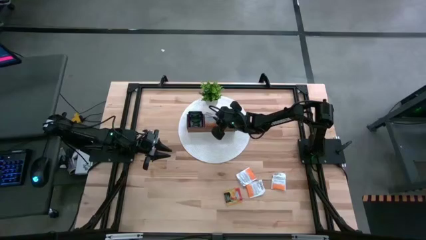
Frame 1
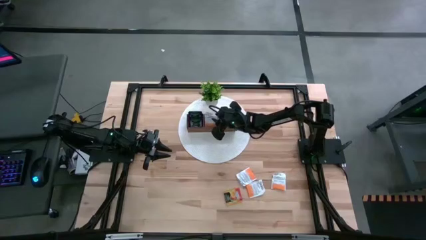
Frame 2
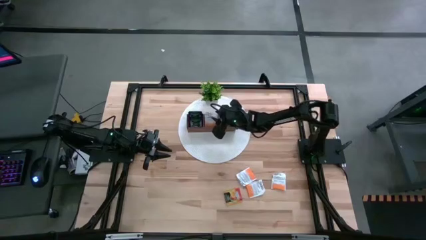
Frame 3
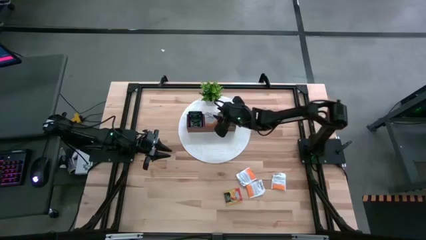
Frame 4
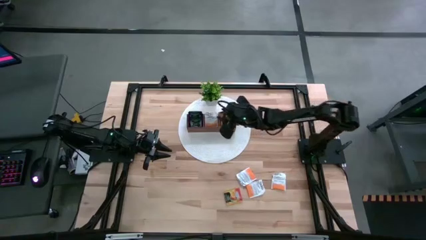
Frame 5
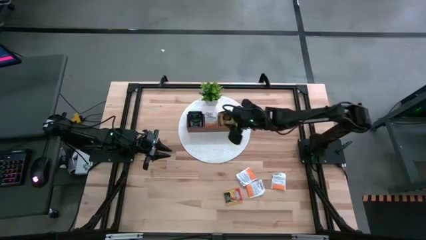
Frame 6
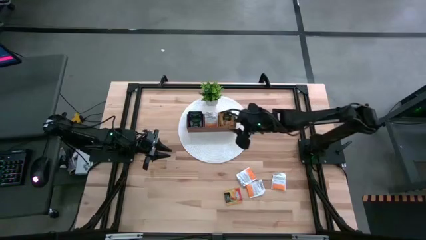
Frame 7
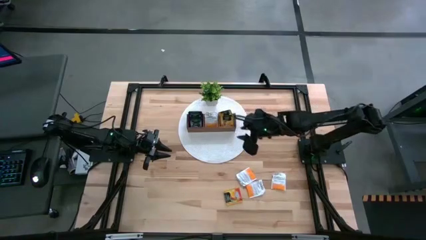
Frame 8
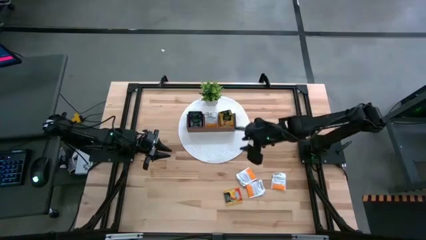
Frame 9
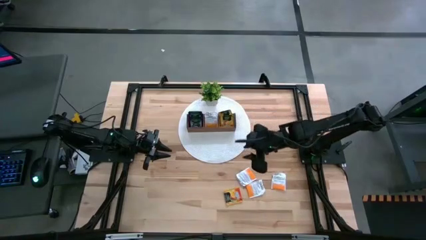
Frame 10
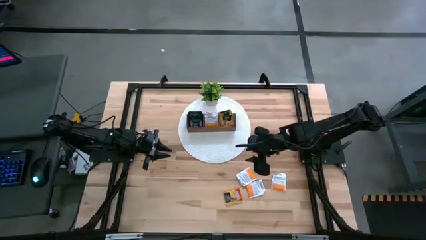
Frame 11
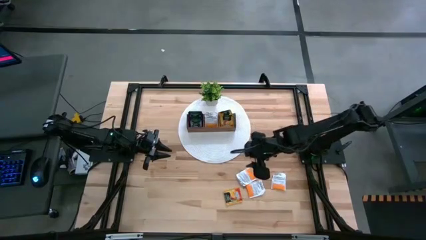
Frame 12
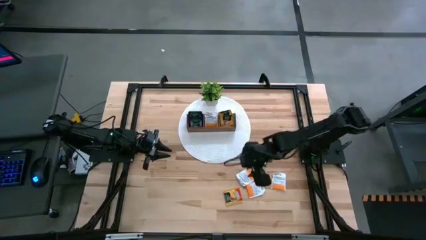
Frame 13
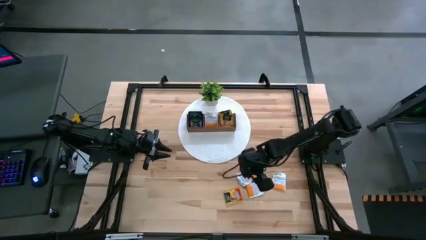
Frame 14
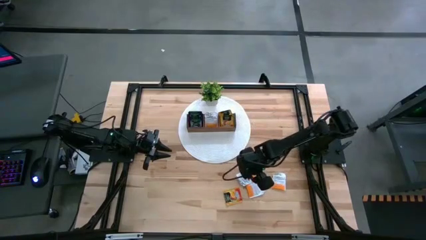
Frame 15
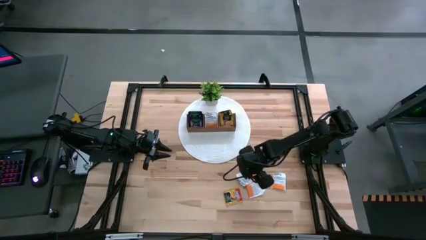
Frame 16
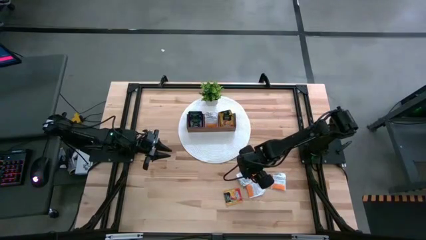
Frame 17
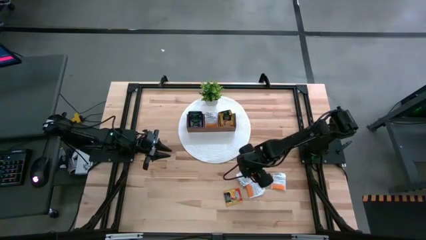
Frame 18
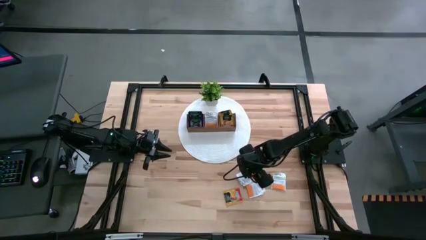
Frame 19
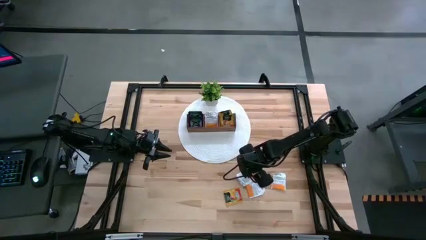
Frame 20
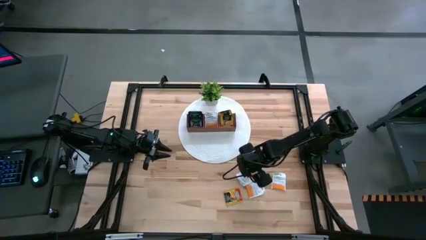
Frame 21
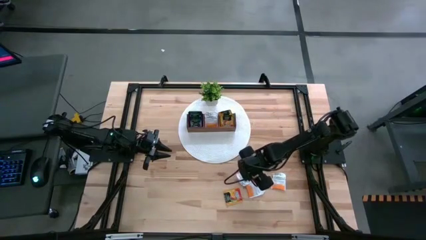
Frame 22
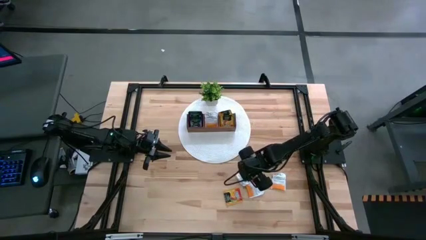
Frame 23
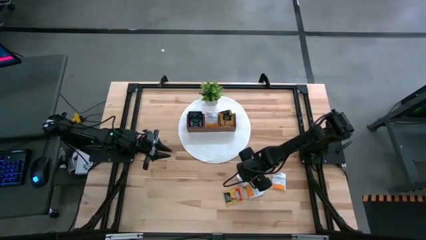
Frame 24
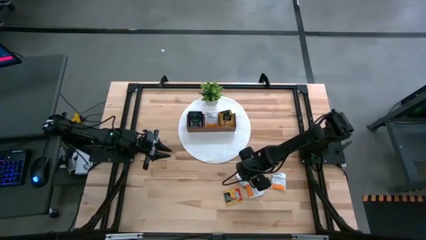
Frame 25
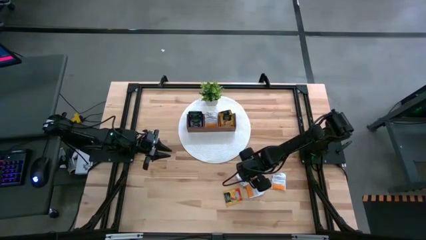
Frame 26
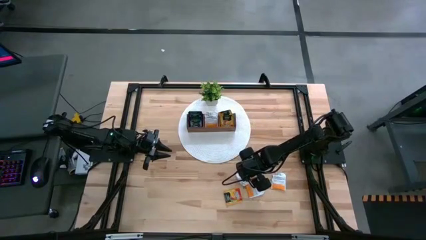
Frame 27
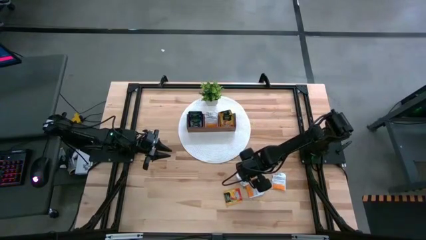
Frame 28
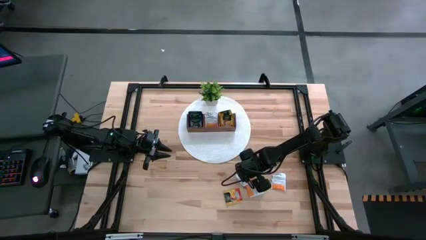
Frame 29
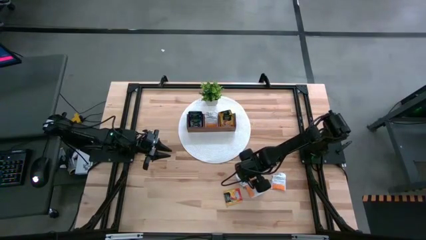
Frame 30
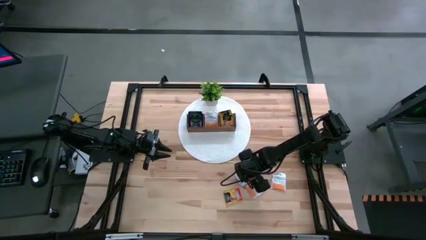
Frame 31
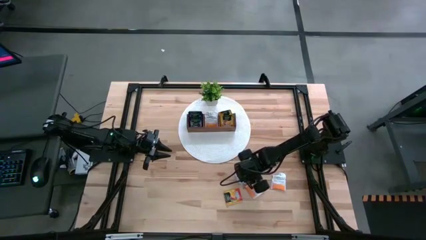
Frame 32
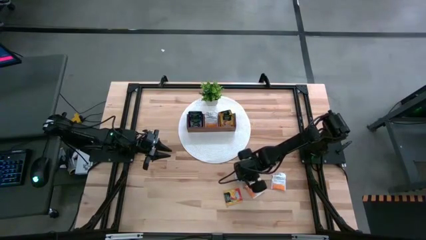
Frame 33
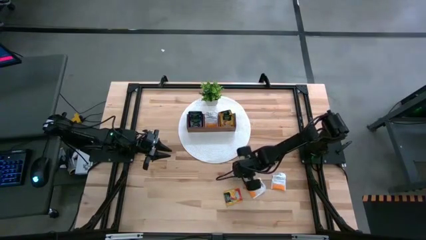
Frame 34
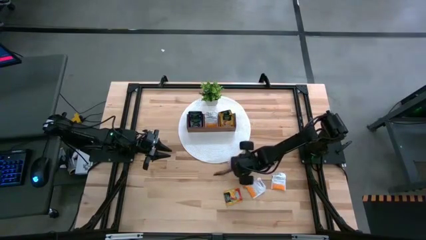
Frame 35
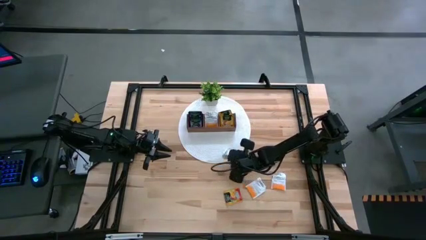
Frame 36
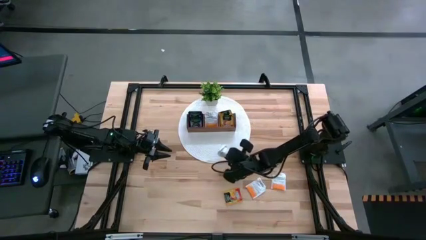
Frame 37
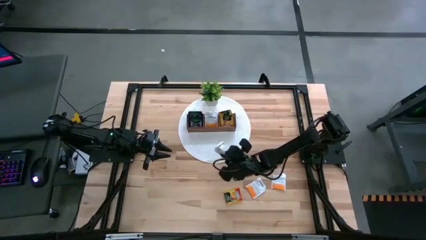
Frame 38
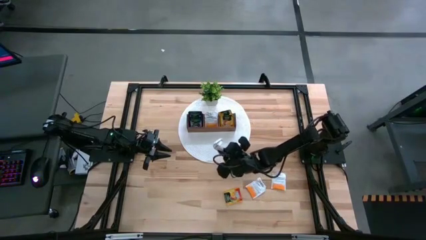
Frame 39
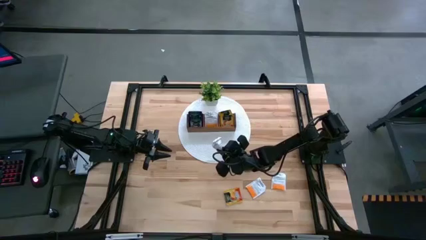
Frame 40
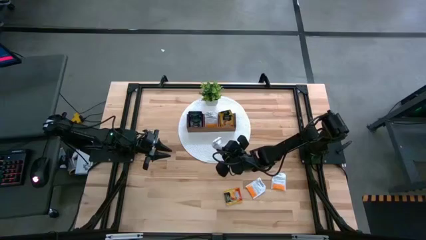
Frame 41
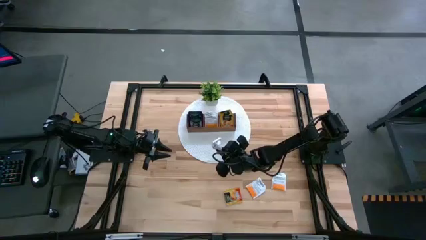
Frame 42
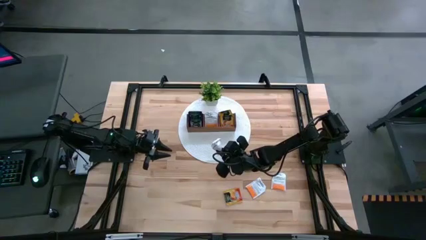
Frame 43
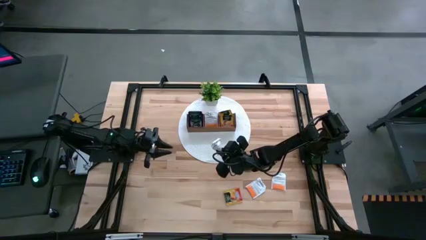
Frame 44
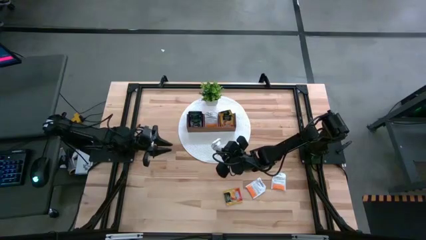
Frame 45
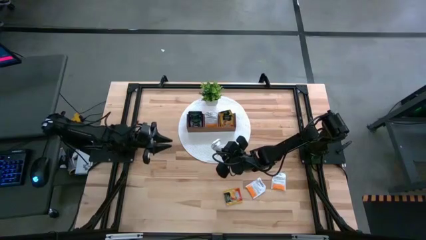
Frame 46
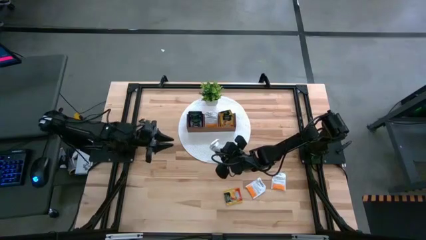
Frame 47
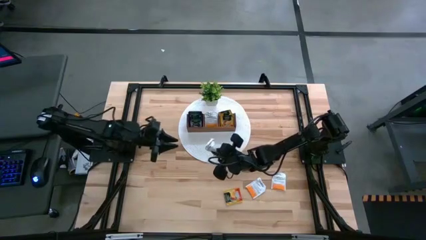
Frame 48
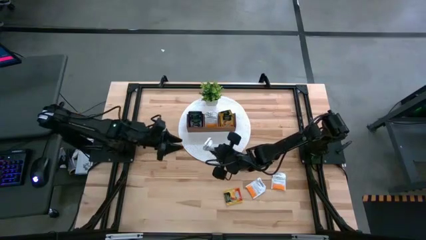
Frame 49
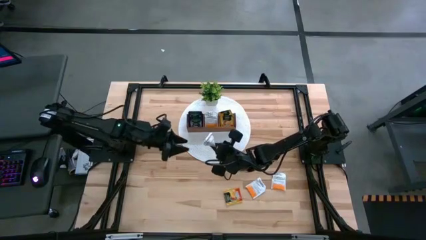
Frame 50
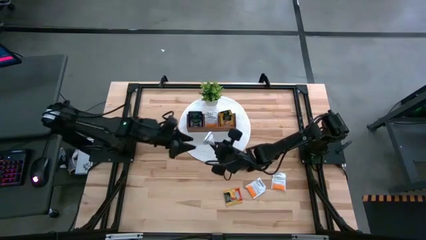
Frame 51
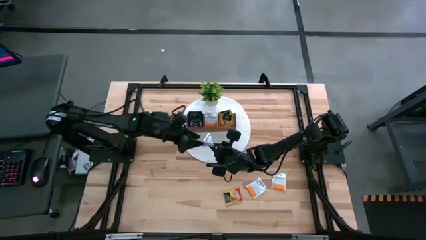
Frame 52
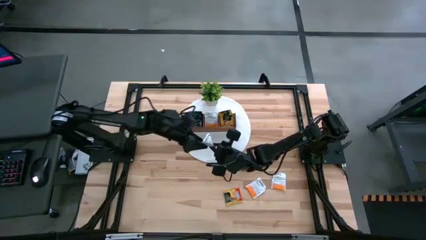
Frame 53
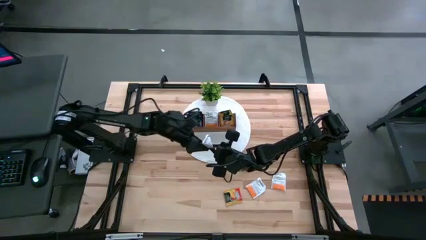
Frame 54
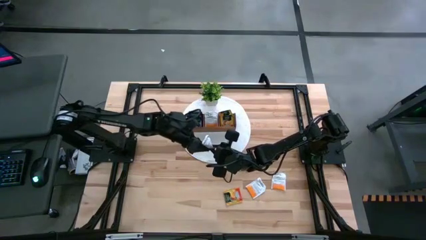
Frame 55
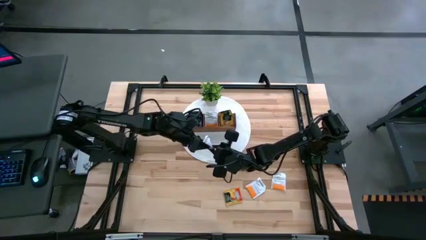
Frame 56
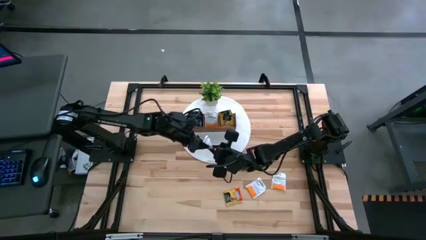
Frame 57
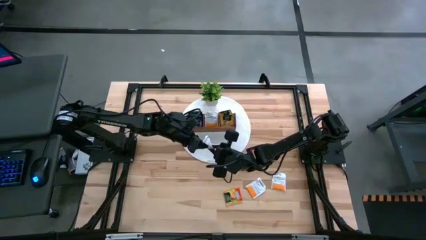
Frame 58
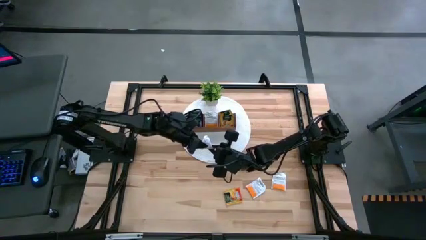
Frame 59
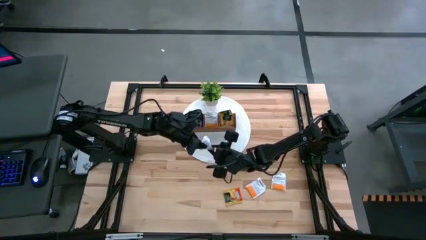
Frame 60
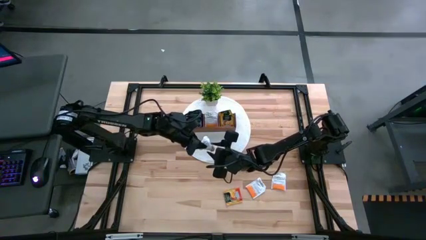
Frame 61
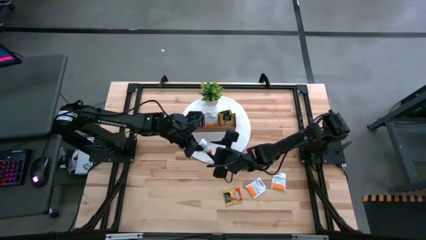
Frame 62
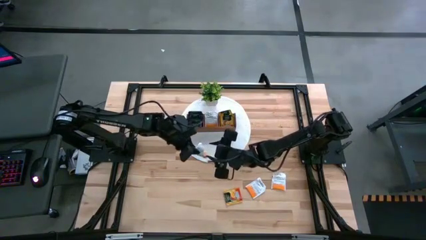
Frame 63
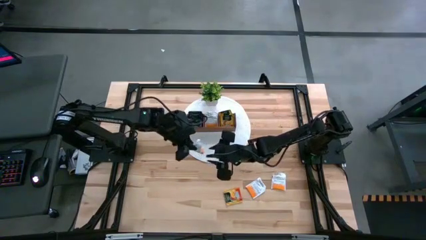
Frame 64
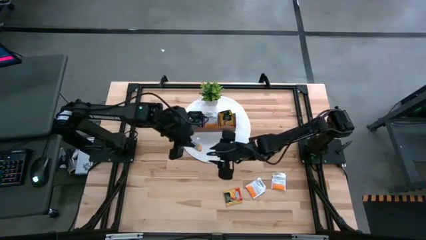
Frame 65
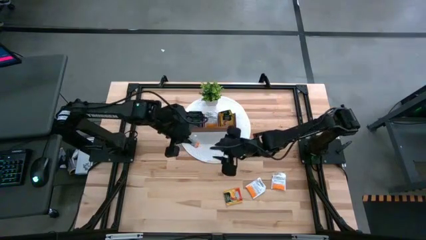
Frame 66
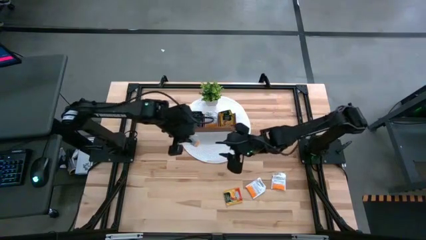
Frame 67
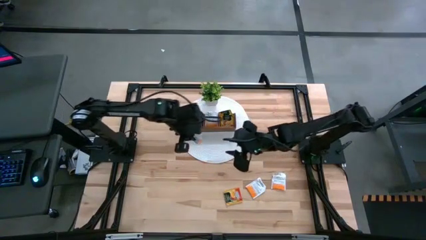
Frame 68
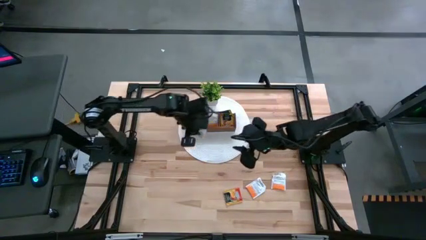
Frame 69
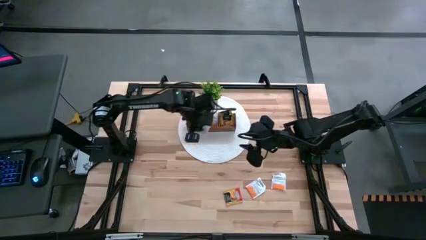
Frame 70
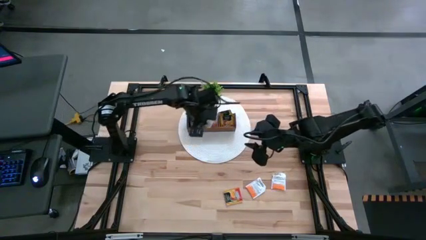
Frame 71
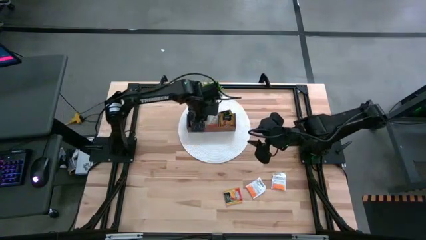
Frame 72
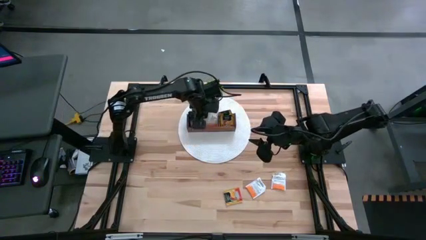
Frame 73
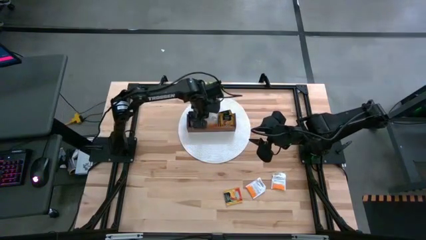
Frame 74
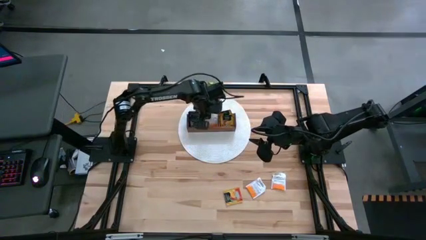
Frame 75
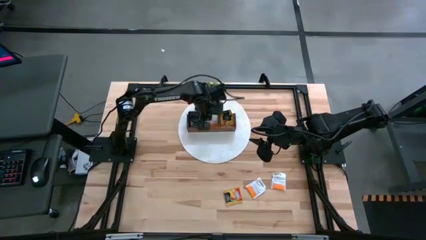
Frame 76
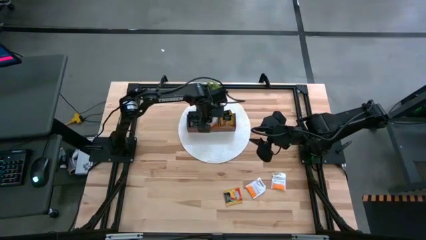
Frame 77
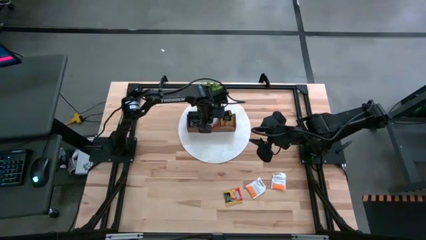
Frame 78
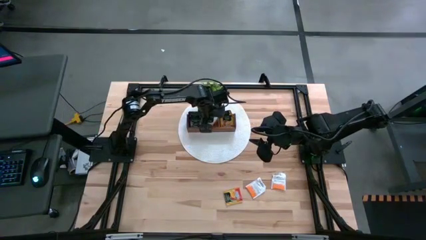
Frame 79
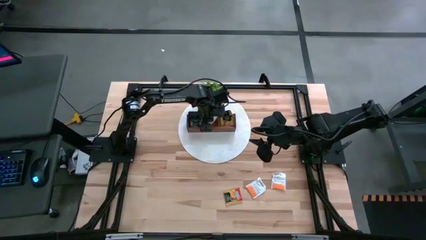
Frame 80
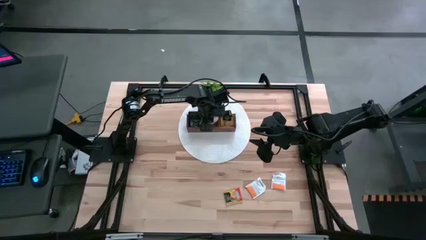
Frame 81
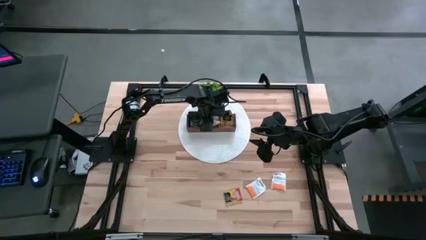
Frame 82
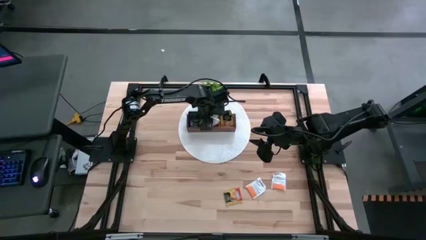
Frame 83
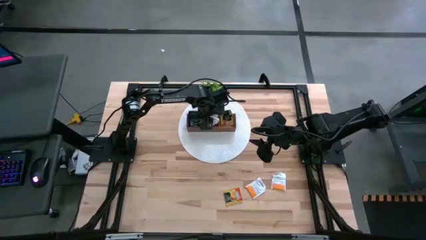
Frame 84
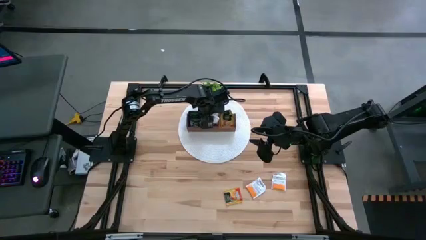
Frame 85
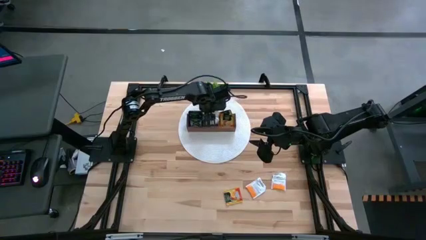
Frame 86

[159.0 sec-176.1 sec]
Task: Pick & Place Tea
Put the white orange tea bag into the middle section of the wooden organizer
